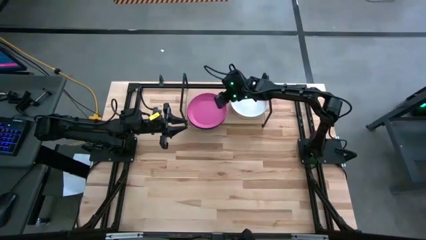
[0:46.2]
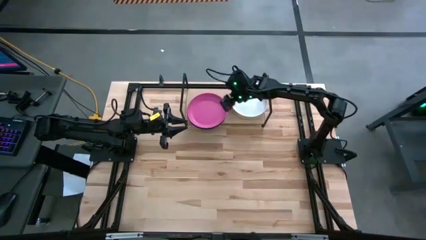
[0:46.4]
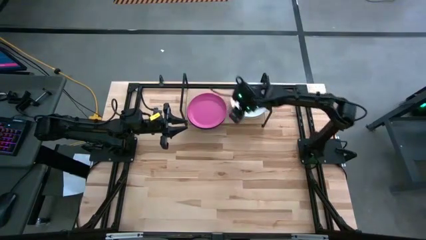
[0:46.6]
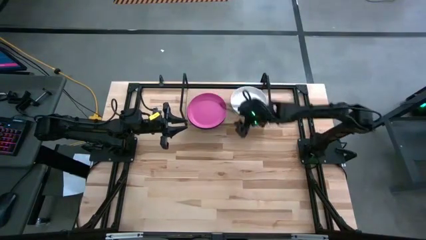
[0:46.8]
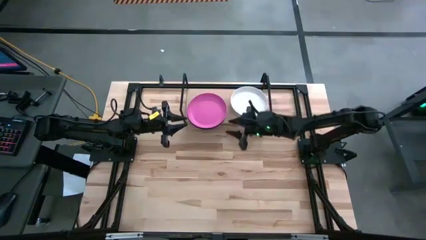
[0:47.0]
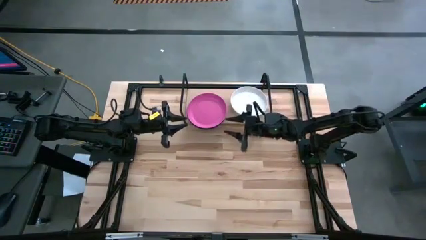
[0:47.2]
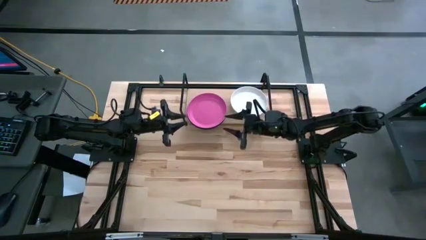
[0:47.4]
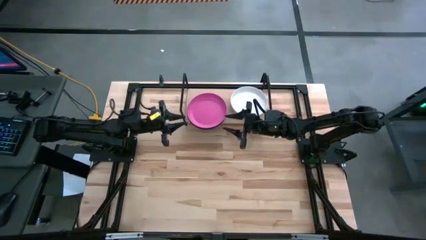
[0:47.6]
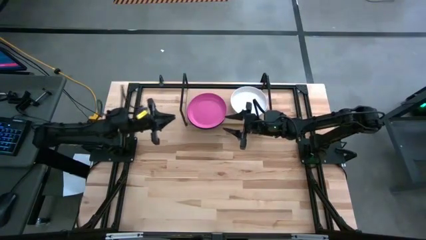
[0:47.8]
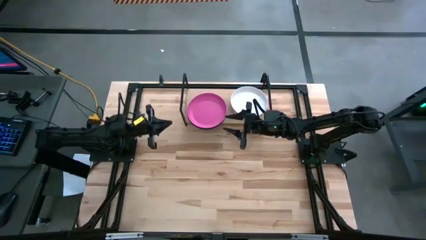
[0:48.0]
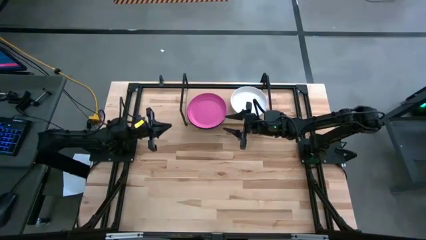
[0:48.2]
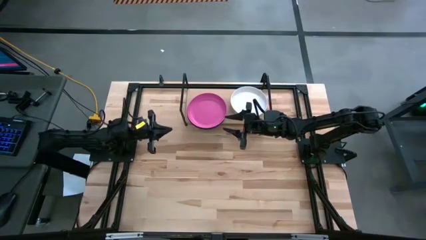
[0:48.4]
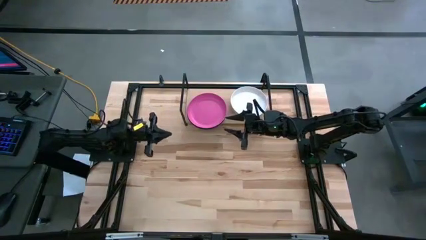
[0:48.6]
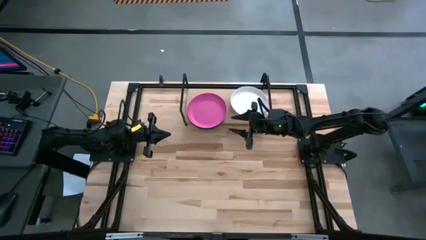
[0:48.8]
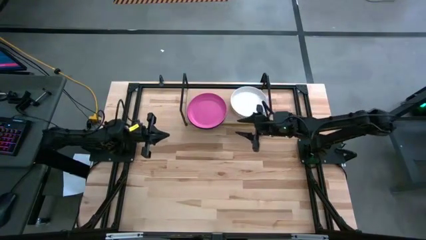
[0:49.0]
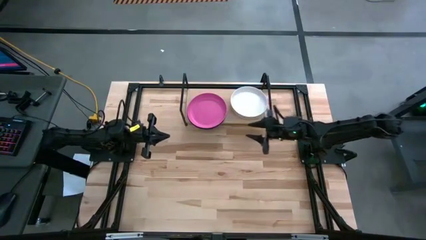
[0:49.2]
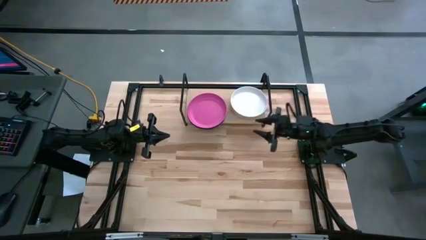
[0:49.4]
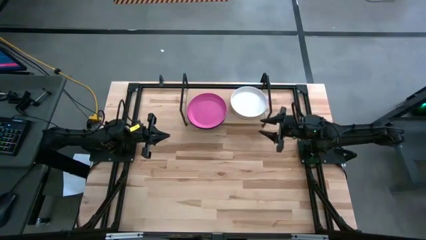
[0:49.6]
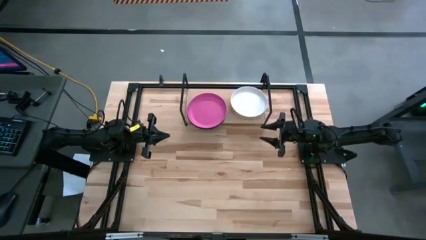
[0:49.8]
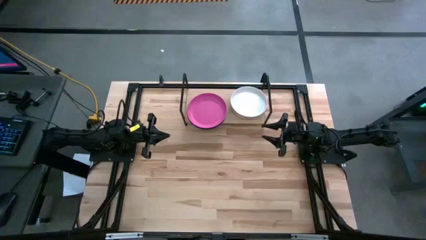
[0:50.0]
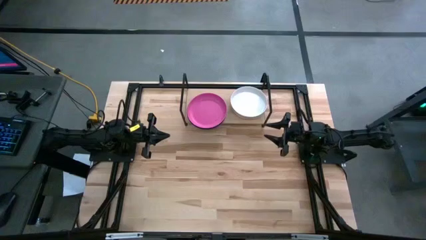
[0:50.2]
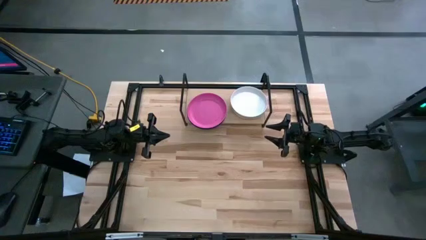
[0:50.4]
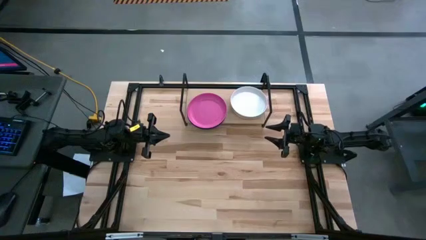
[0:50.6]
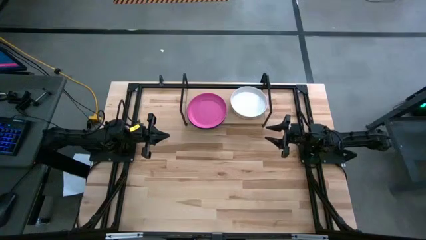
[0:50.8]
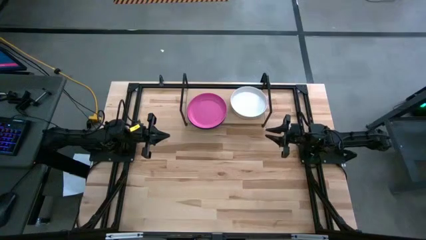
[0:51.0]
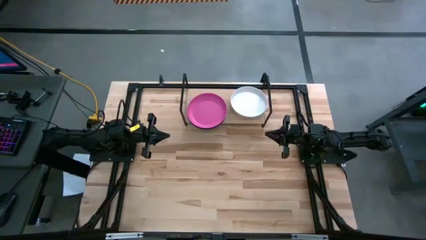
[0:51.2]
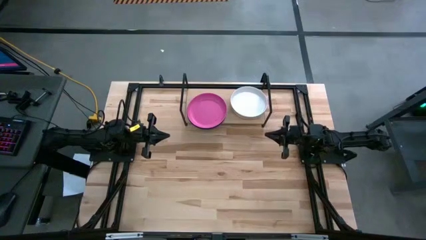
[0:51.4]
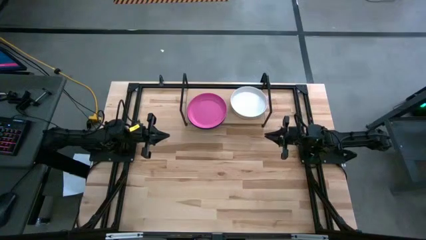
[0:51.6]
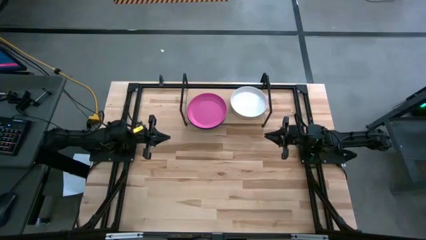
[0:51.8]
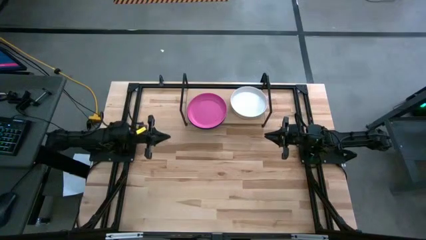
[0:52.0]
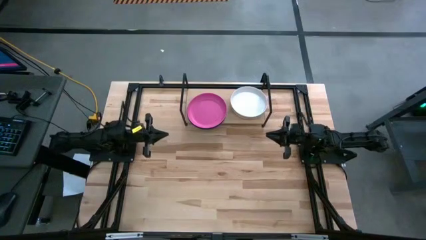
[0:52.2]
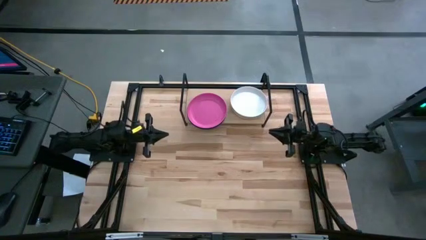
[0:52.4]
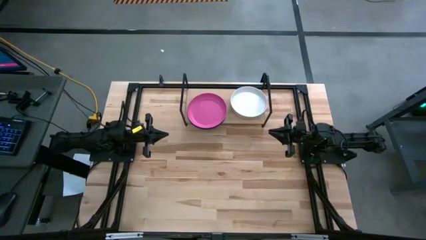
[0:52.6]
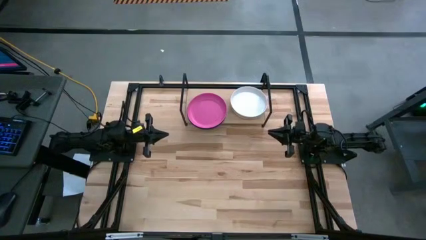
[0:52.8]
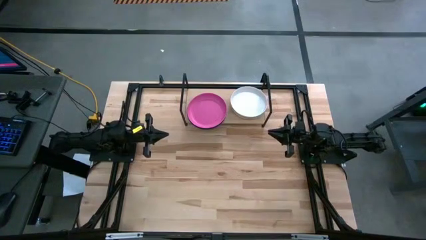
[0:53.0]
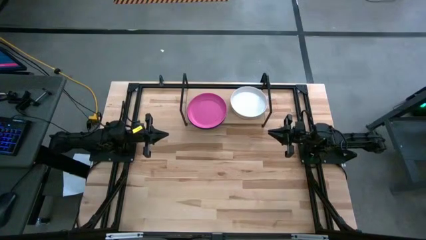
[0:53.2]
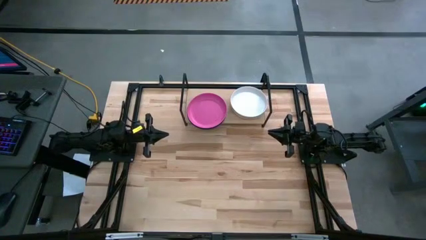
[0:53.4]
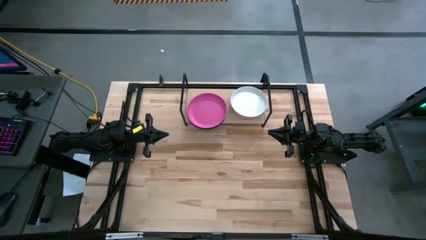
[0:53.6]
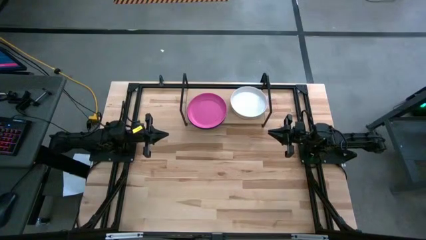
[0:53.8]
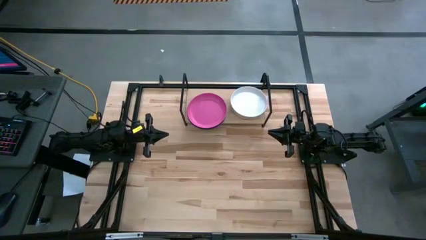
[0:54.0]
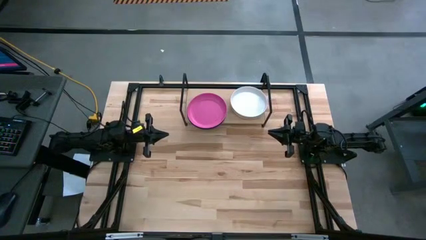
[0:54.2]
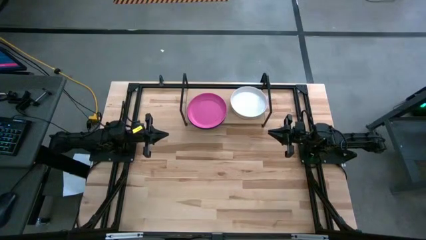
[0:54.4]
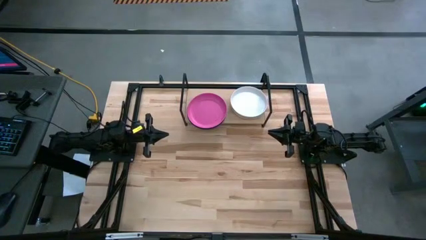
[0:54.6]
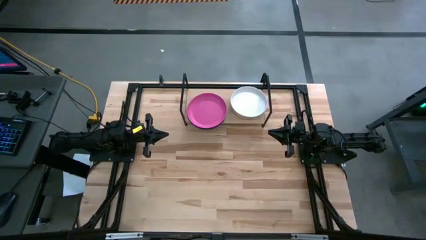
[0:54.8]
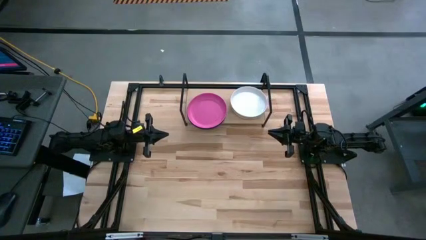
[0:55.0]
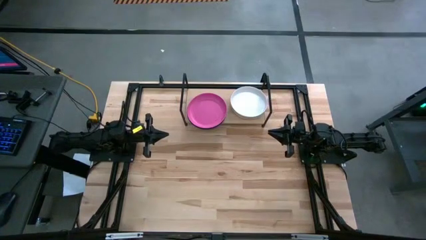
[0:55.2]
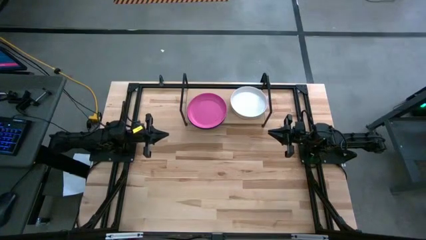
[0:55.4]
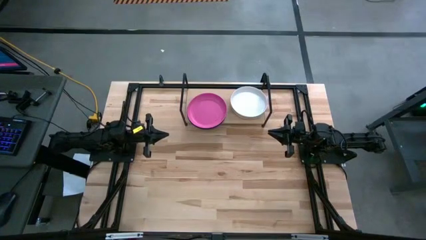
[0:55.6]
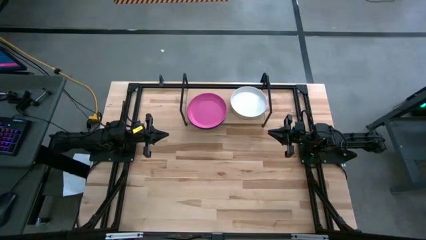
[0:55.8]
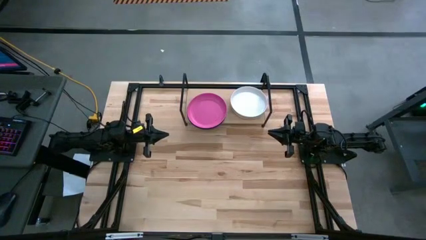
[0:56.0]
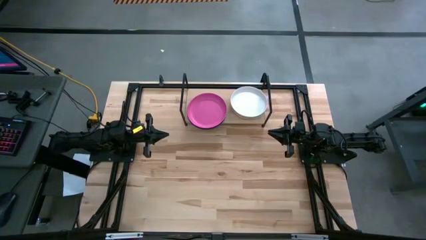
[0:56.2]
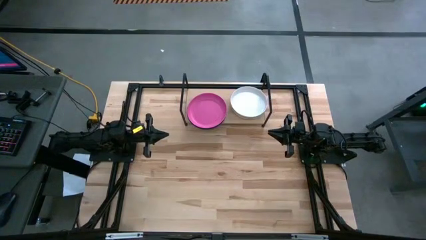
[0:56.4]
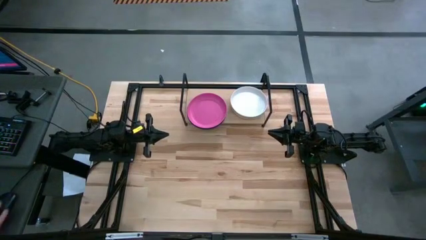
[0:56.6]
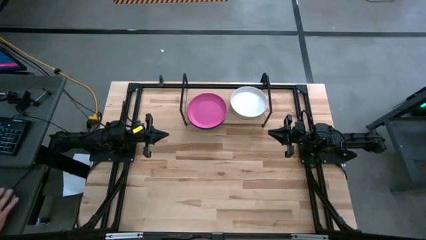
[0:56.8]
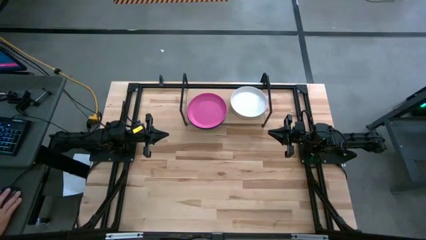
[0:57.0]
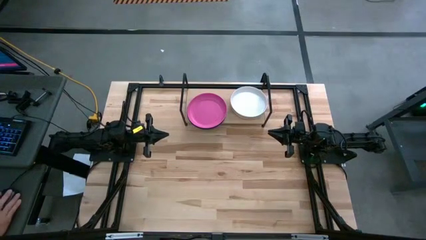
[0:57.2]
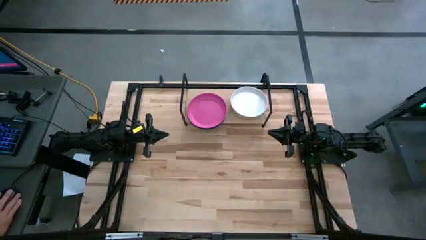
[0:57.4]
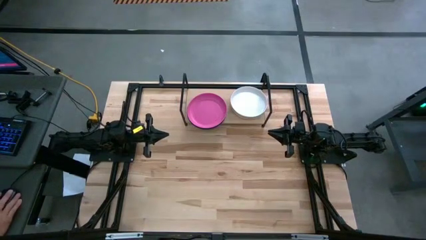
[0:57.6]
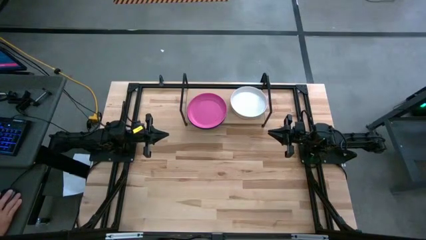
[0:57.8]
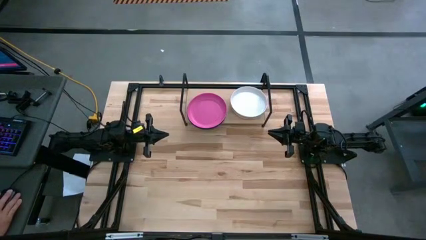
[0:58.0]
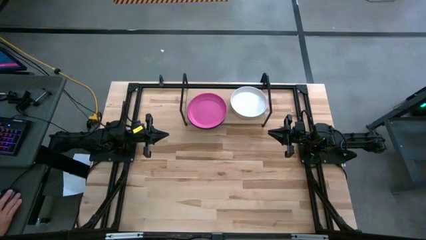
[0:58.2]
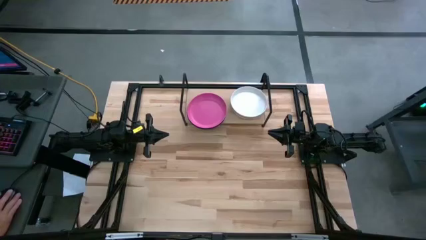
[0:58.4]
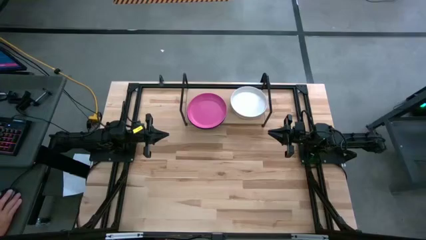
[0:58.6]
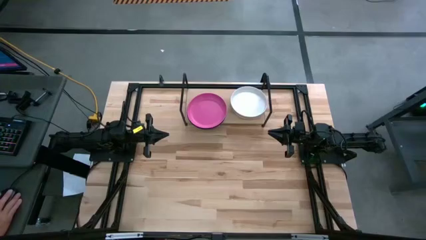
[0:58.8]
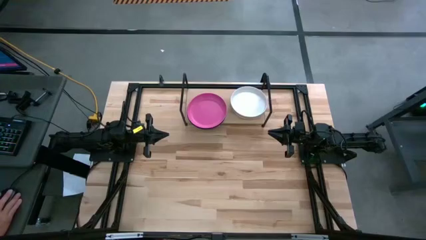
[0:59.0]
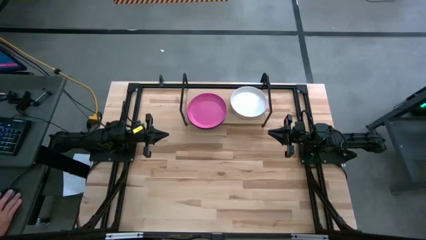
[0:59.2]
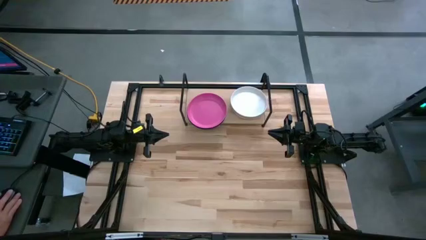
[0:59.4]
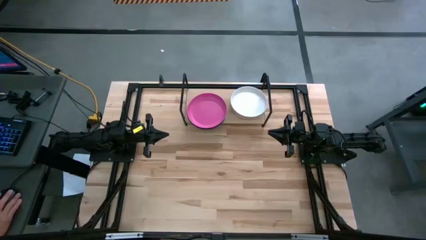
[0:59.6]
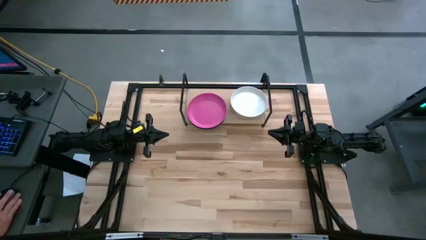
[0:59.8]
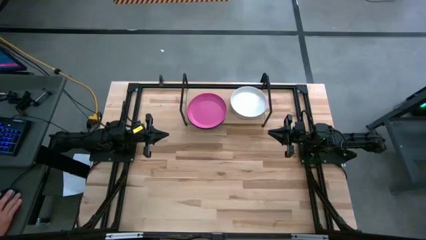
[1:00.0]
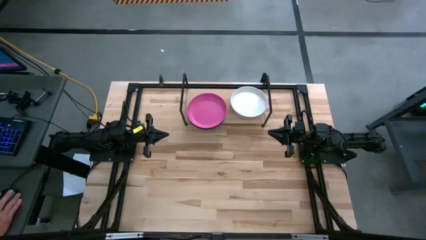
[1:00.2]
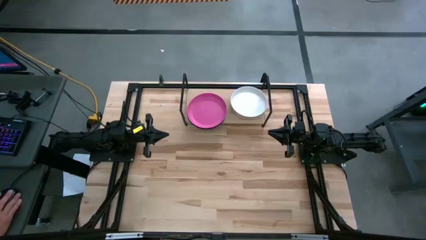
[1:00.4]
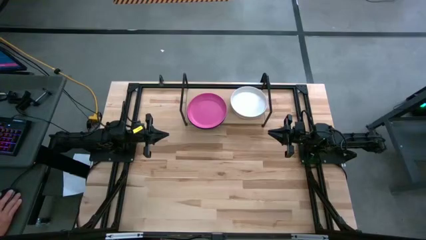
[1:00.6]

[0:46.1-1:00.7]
Task: Place and stack plates onto a shelf
Return to Home Position
